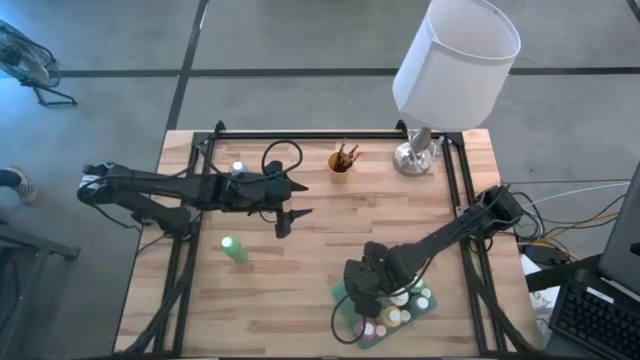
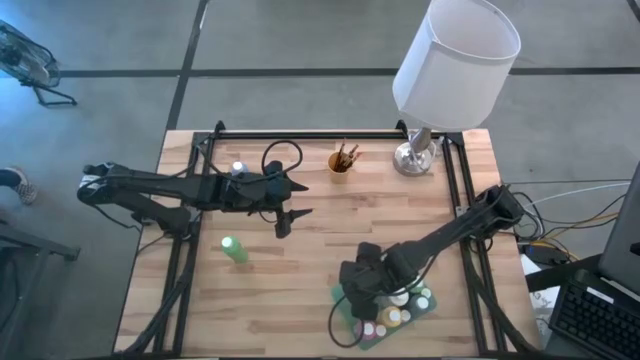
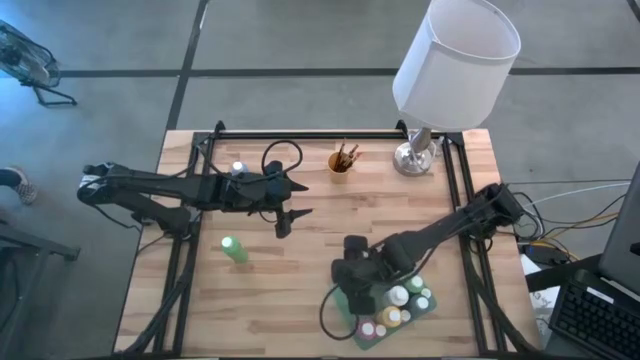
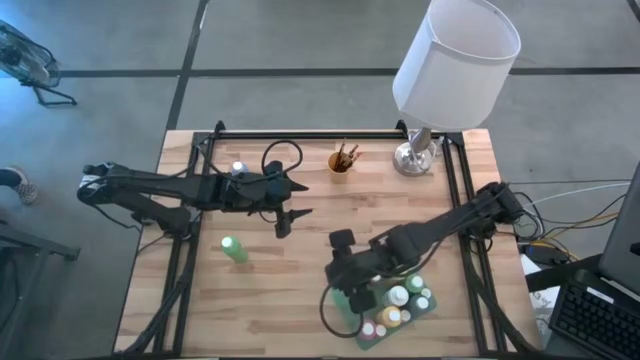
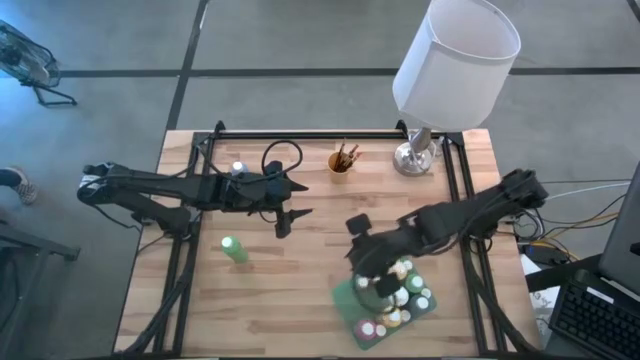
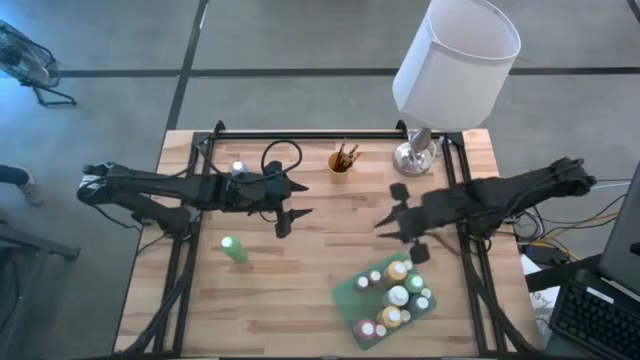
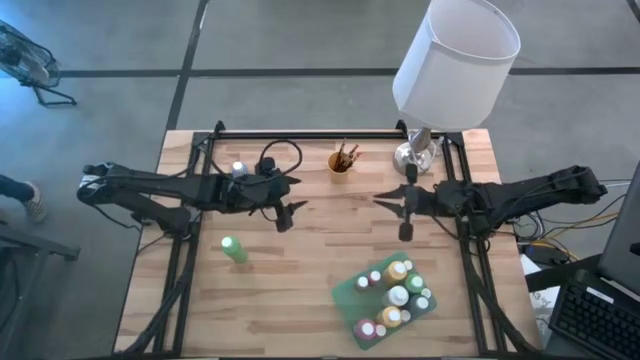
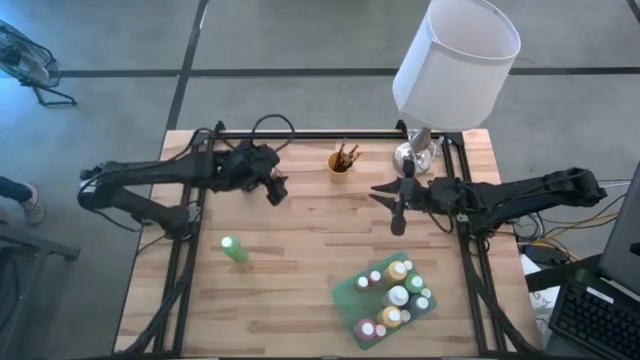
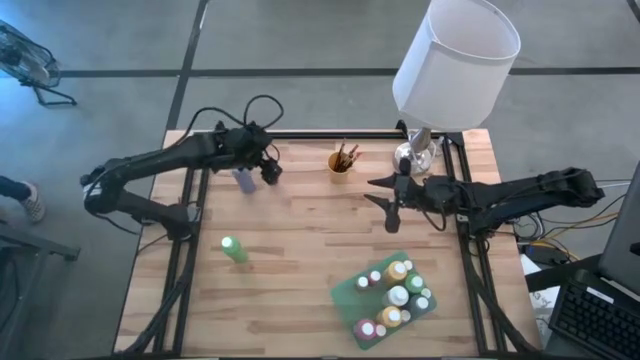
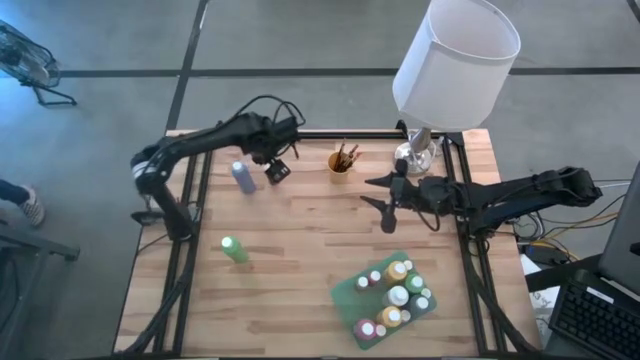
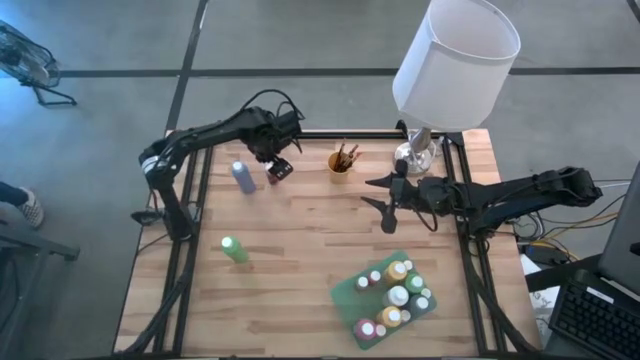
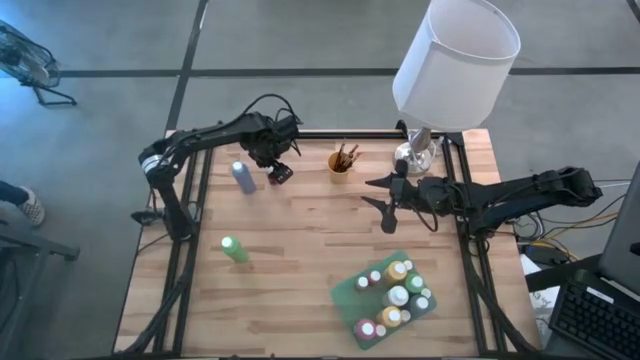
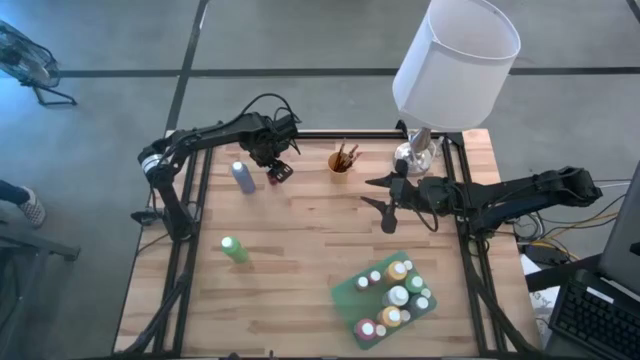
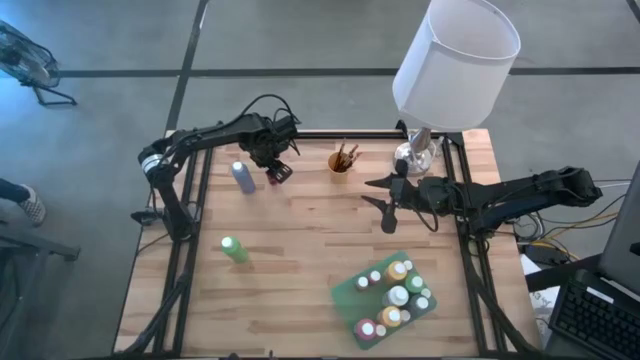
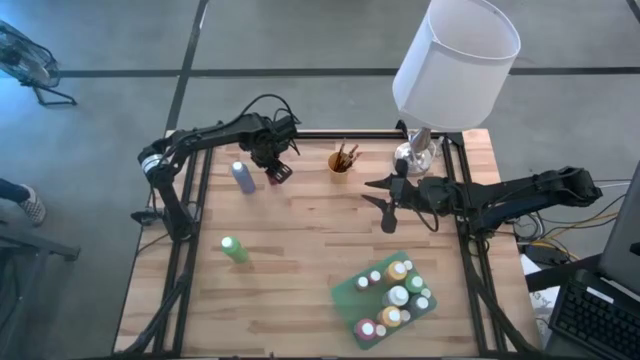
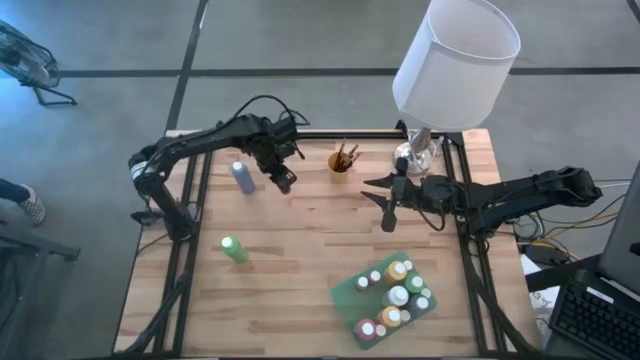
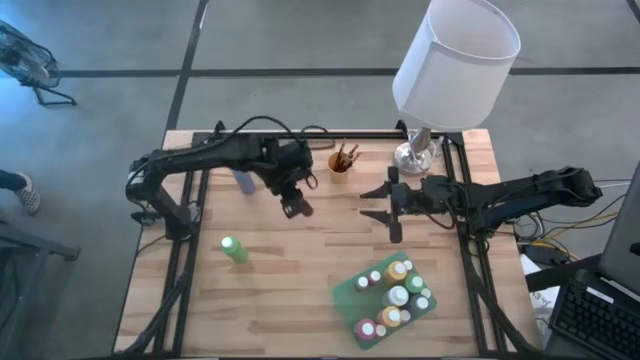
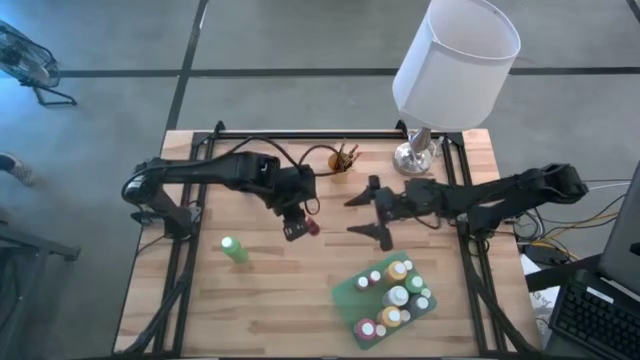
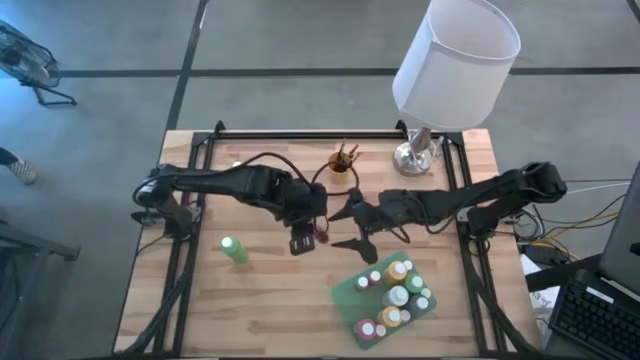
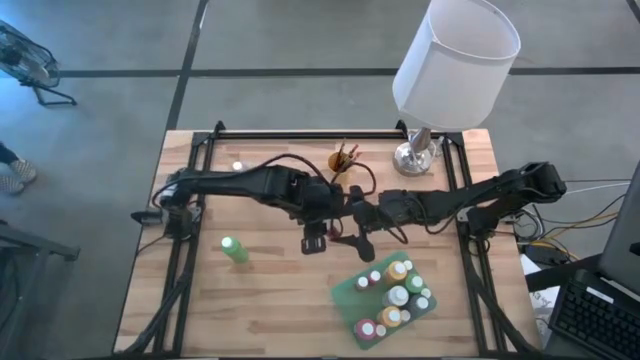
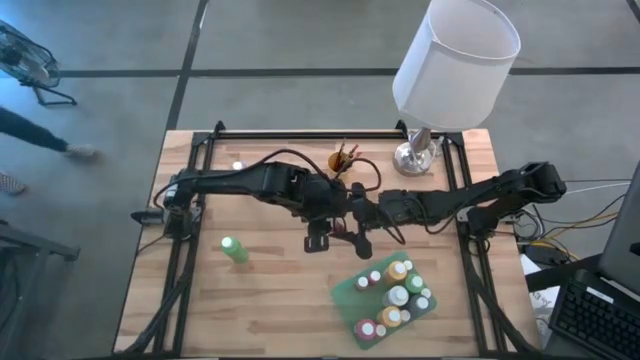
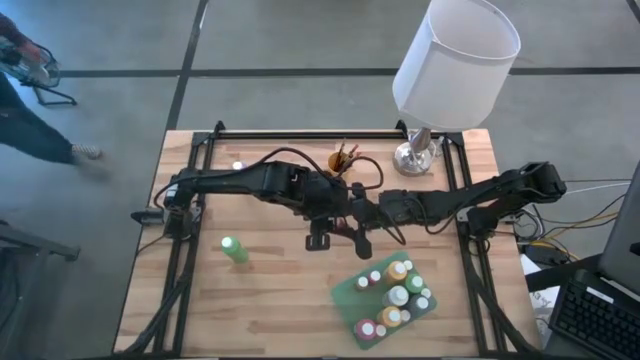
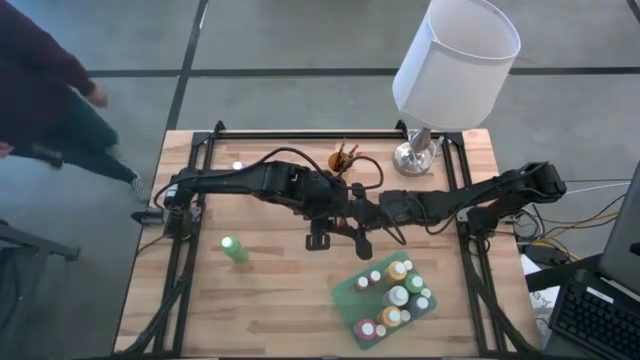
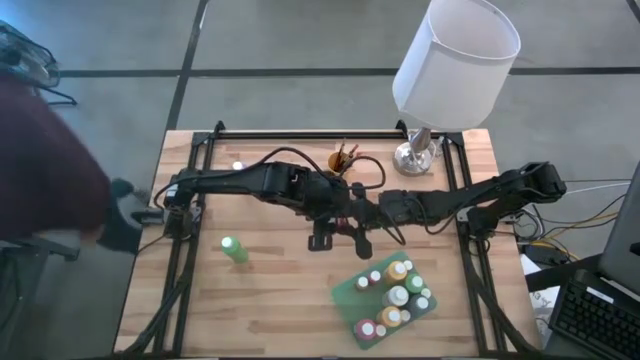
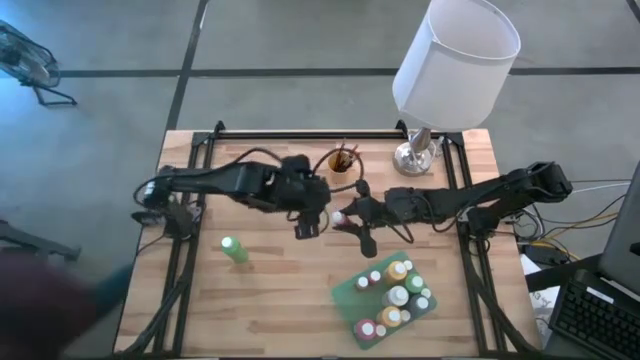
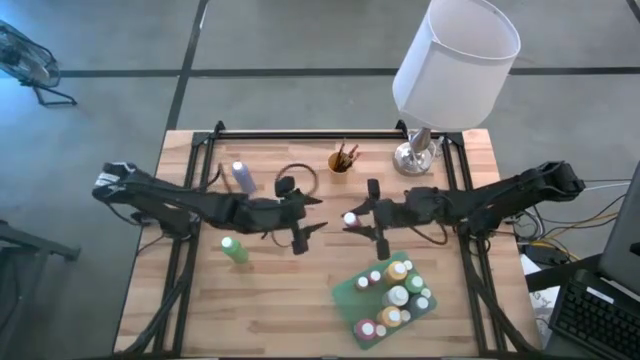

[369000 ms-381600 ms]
Task: Pick & Place Paint Supplies
Put the red paint bottle into the green bin

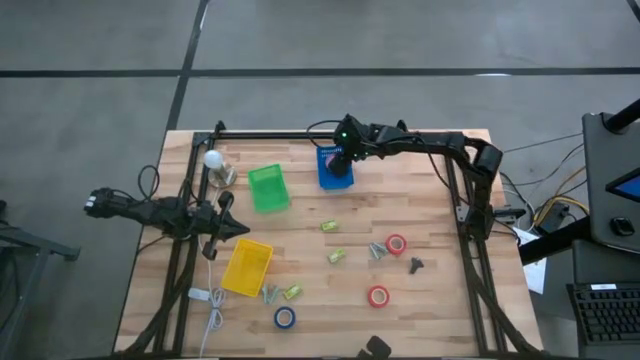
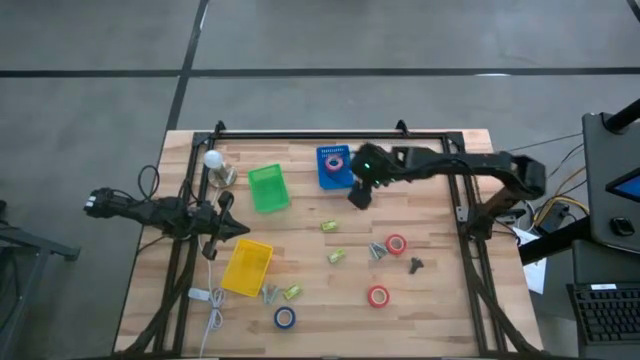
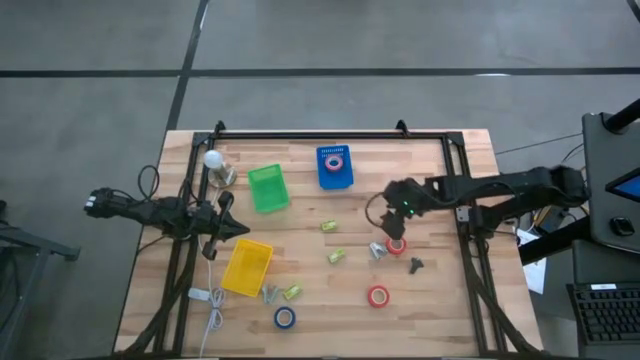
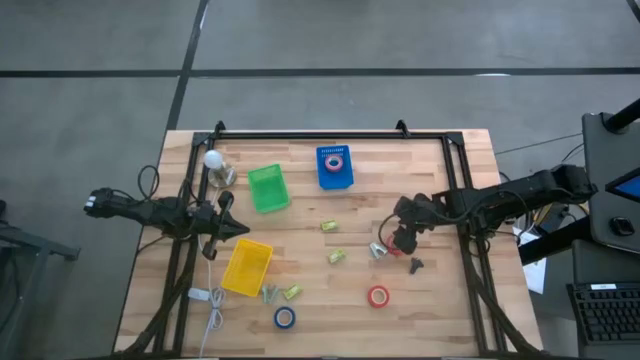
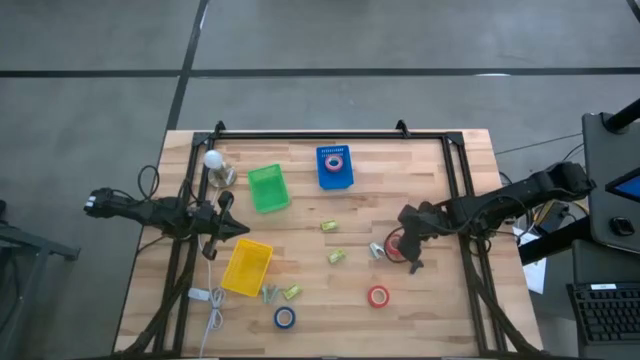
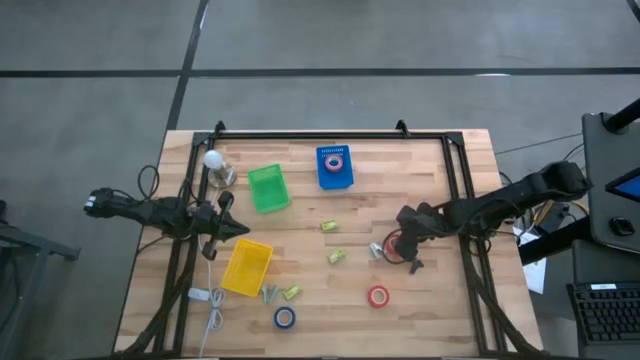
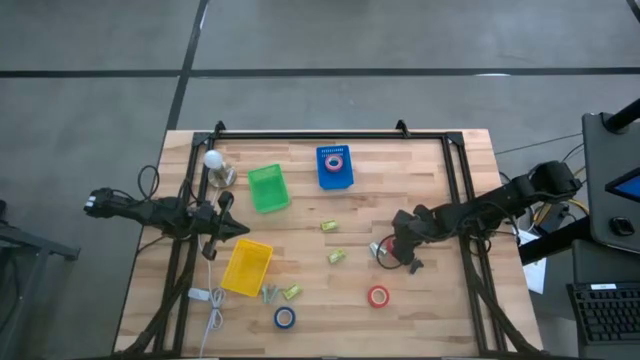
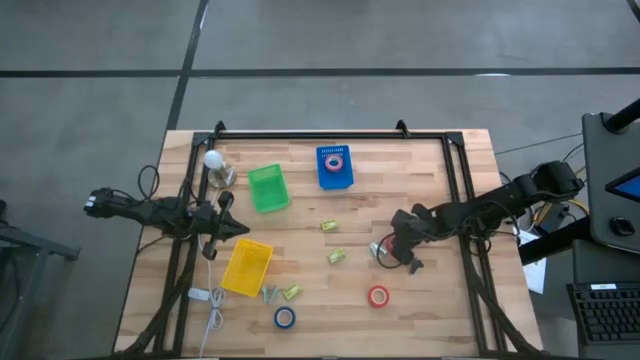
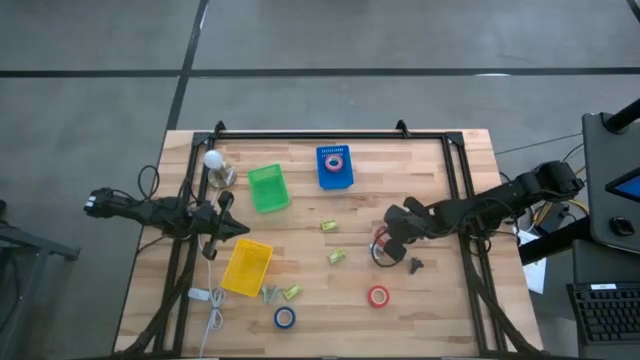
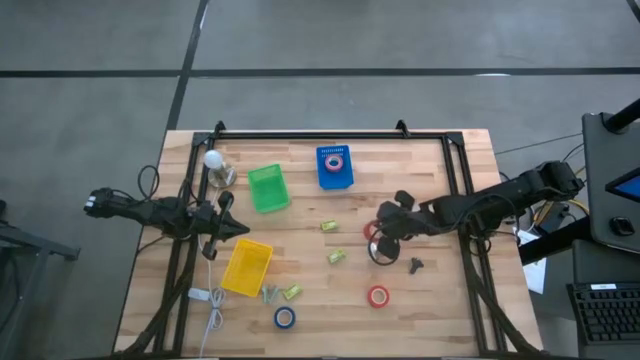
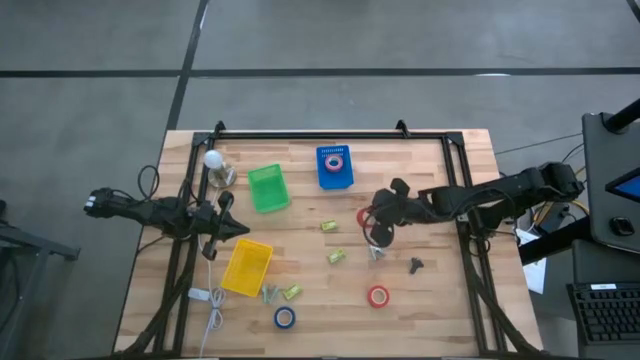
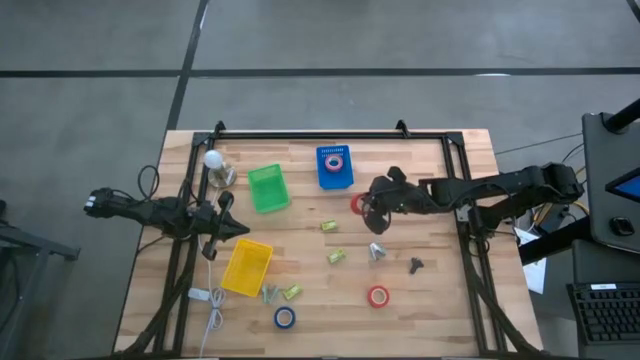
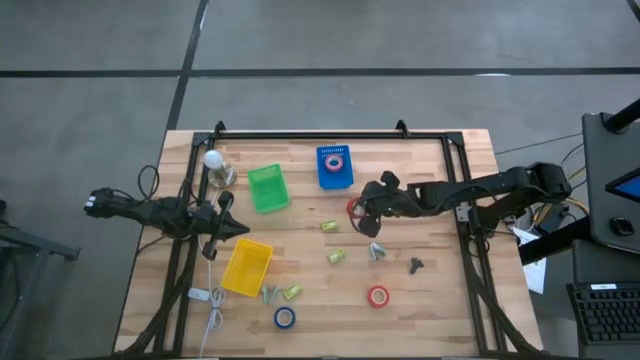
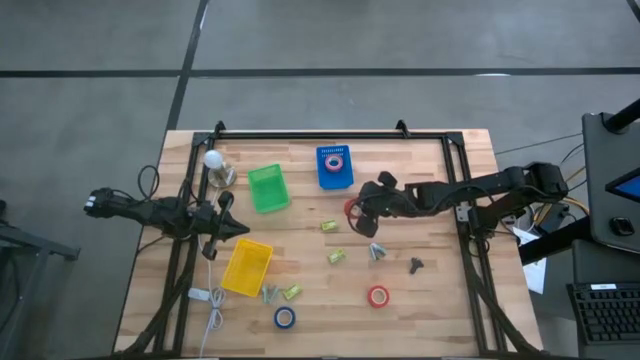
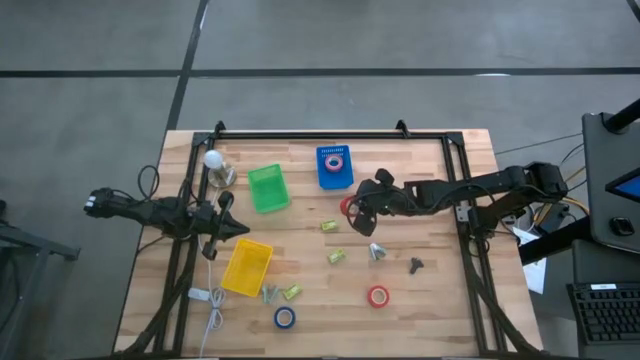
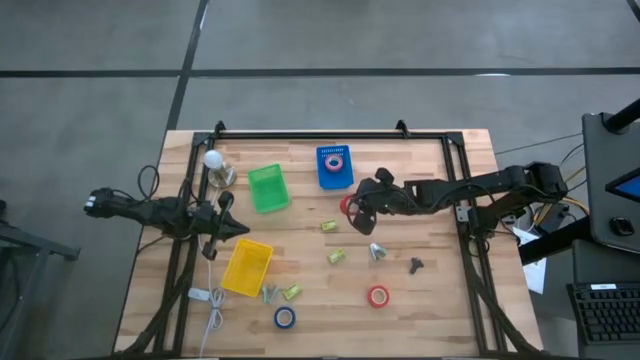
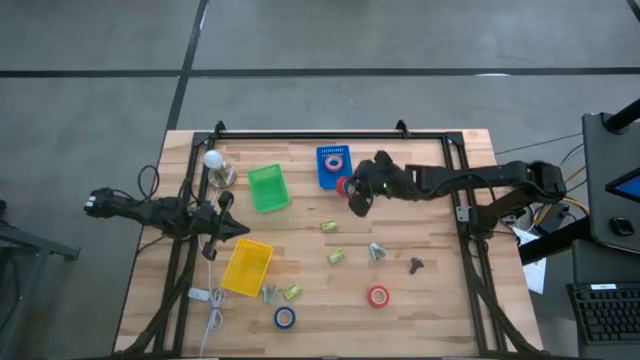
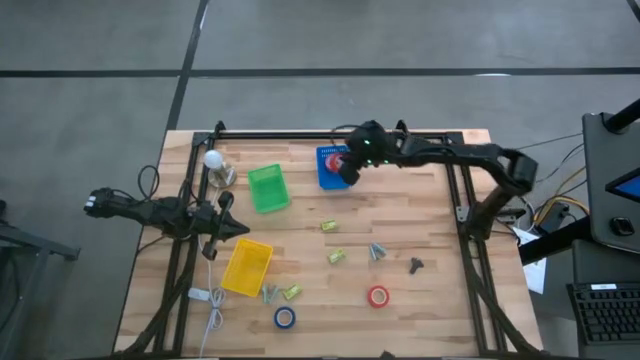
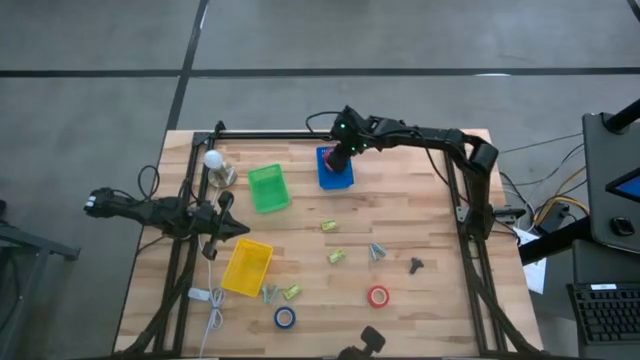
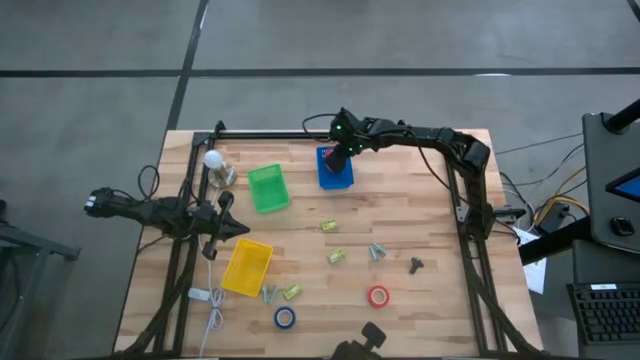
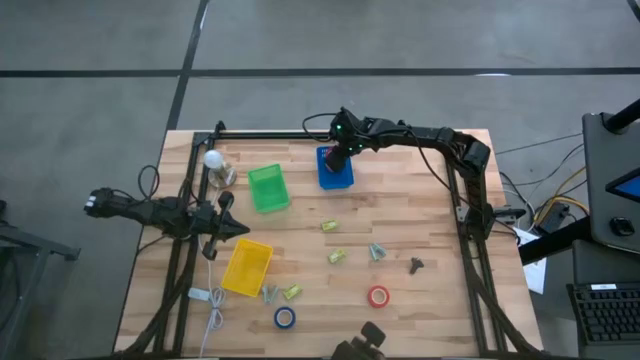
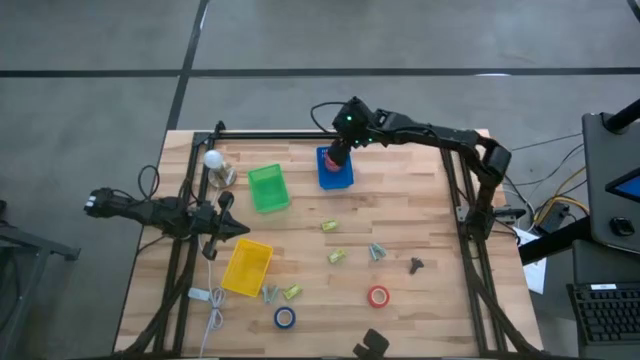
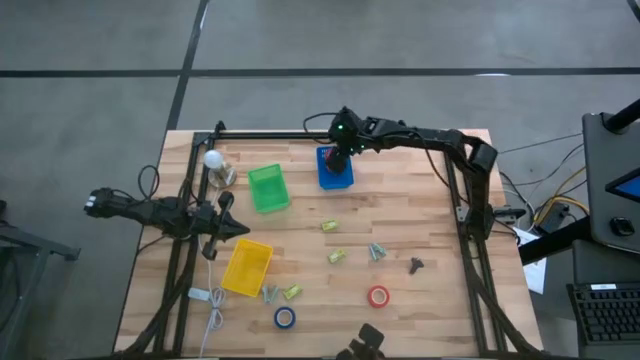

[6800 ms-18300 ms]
Task: Pick and place Stapler, Stapler remover, tape
Put the top red tape into the blue bin
